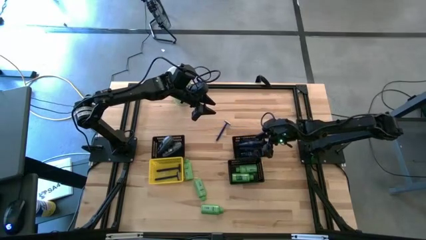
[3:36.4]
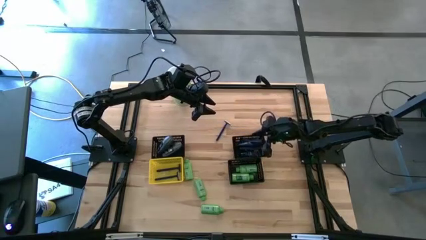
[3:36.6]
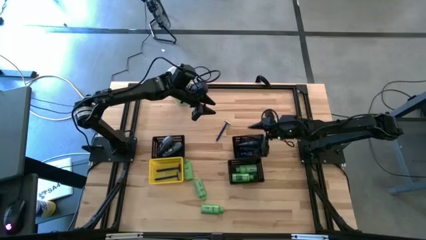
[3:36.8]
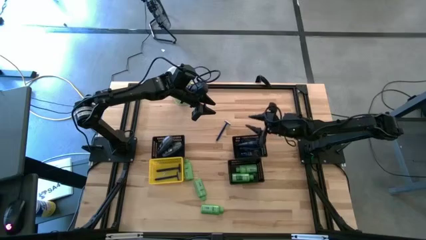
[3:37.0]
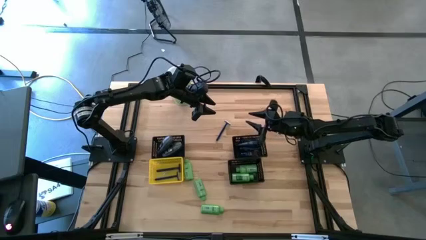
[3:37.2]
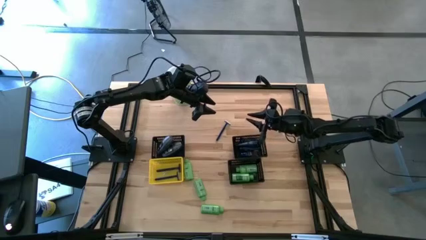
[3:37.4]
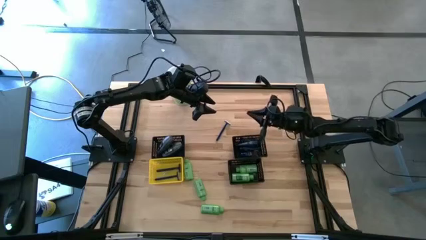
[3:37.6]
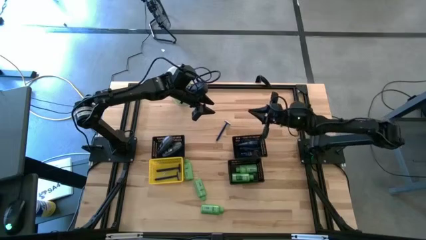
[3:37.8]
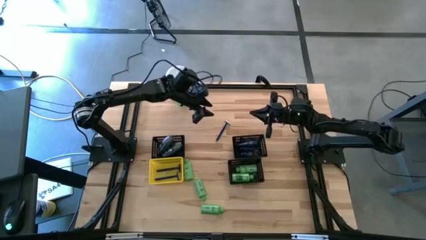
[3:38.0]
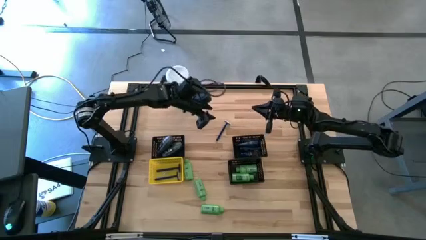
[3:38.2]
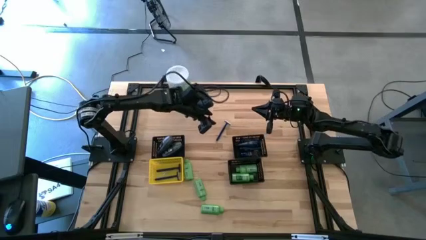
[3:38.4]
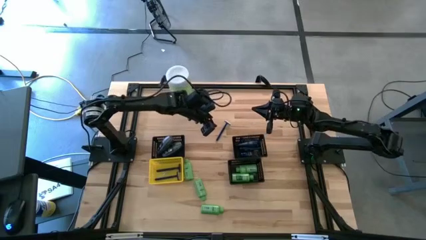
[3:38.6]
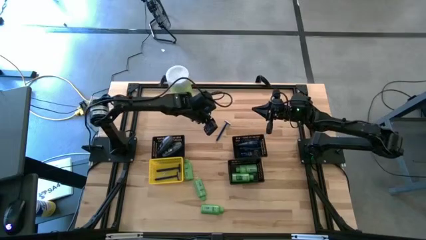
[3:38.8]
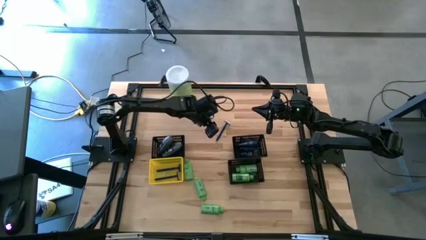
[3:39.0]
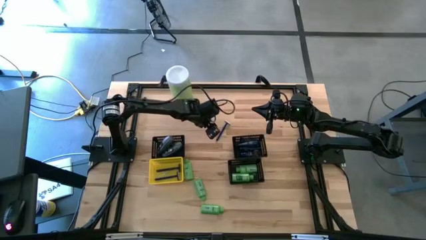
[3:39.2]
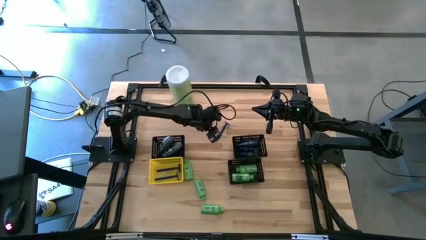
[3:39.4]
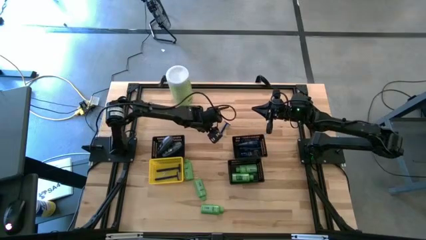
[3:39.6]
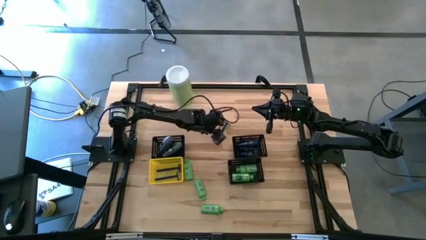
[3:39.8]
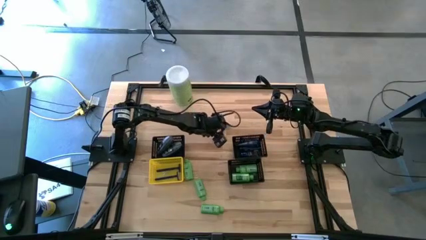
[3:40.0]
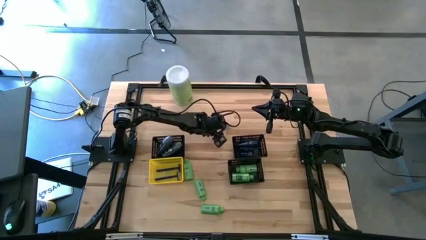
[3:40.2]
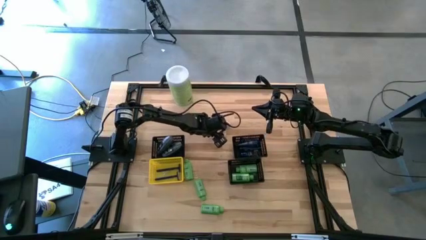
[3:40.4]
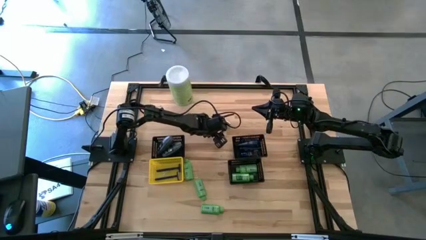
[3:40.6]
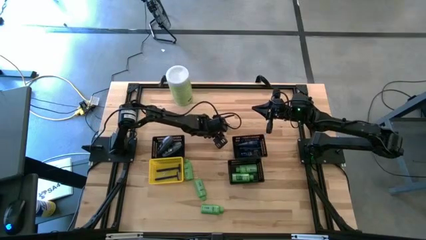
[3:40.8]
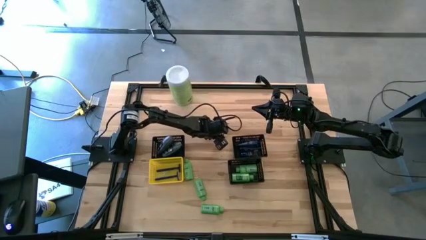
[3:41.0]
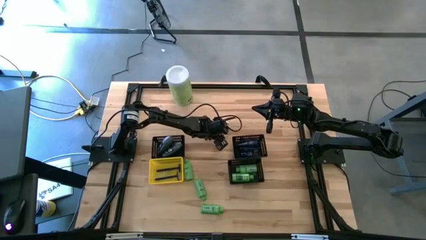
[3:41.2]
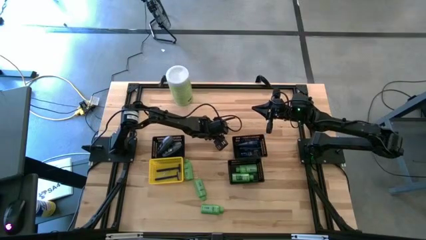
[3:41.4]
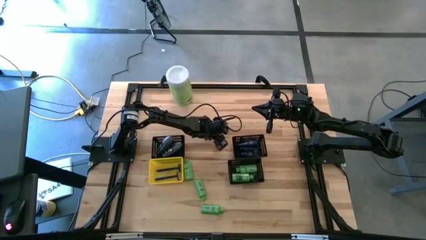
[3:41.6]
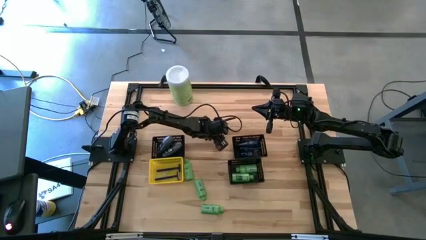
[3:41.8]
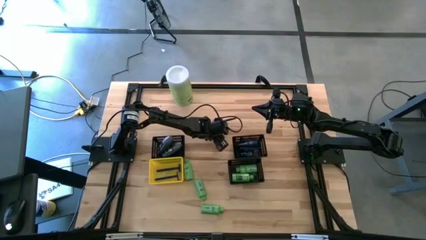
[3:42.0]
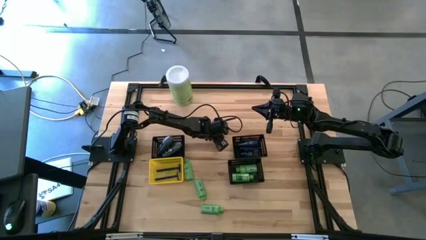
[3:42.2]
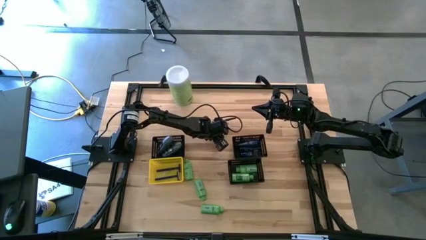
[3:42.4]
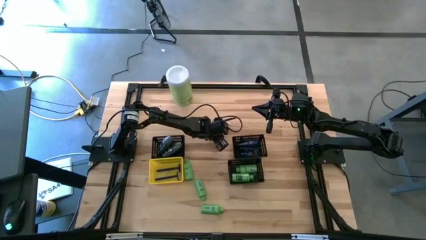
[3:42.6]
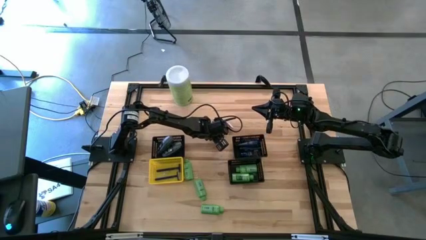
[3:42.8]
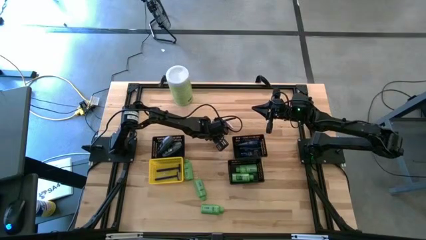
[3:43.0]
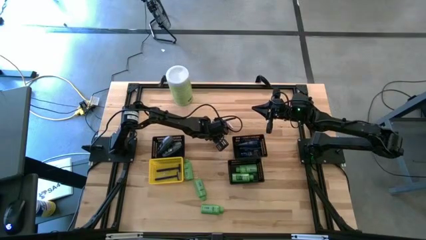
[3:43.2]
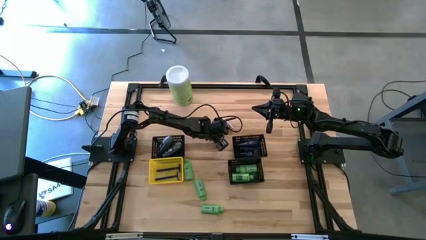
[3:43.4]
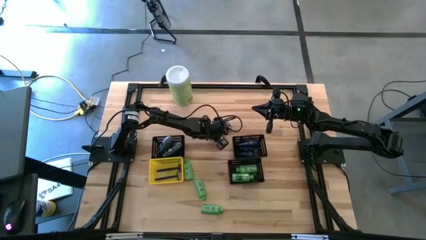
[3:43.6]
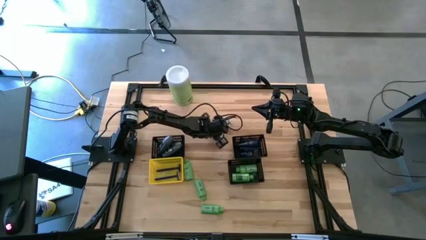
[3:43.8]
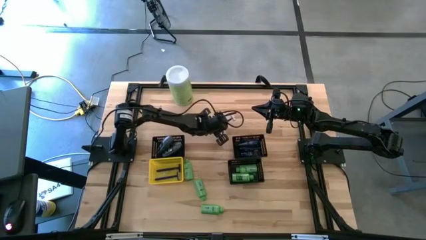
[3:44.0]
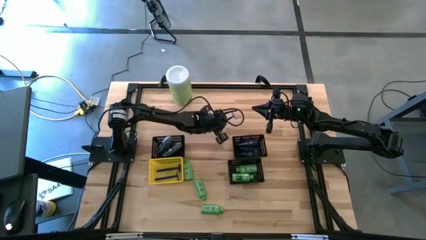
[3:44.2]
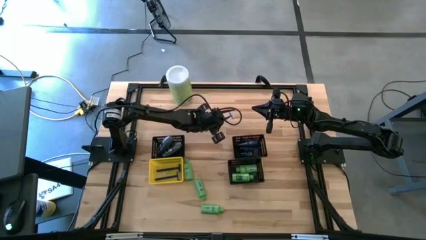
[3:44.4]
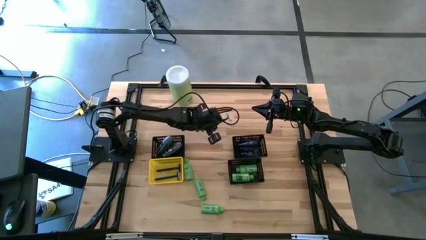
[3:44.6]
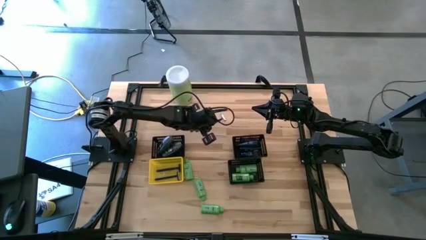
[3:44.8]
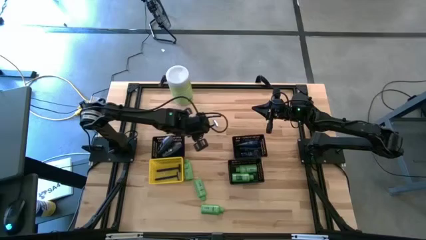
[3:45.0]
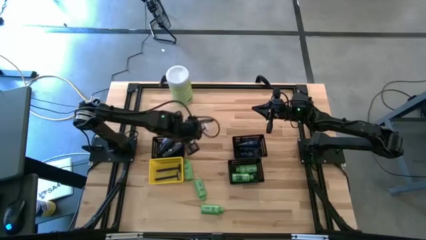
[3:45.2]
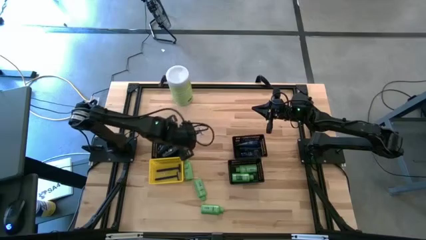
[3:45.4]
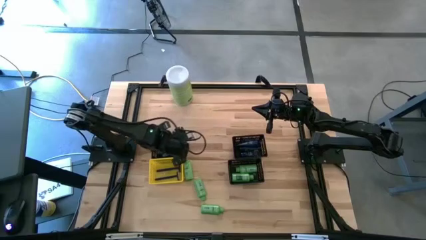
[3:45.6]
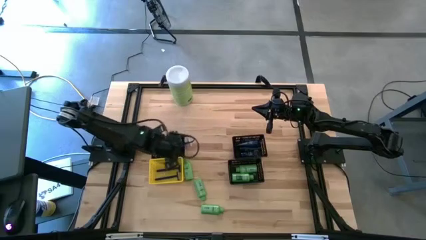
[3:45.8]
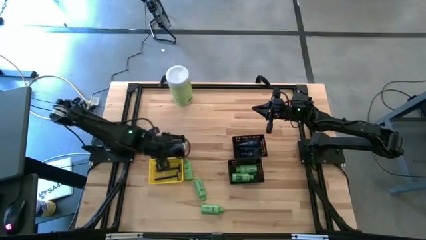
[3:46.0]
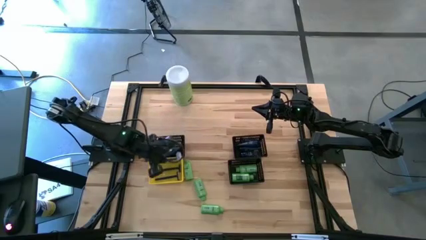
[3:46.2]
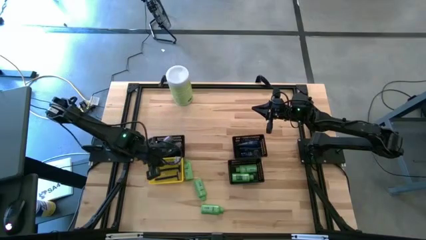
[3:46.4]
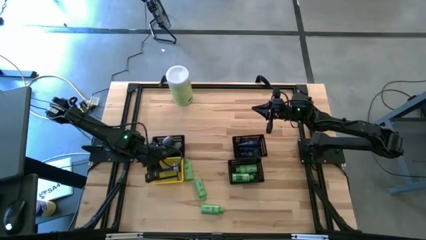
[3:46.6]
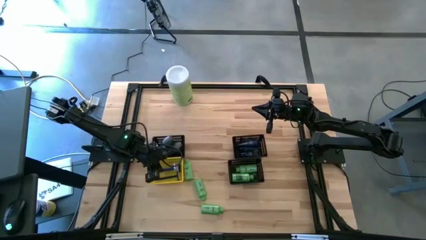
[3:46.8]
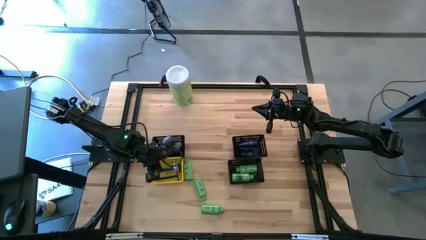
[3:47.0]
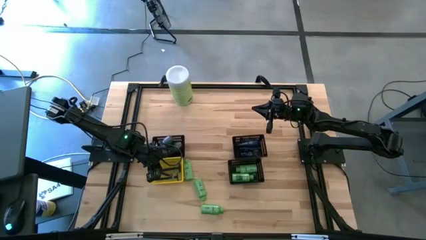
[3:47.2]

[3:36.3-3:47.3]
Task: Pick & Place Travel size toiletries
Put the blue razor into the yellow bin
